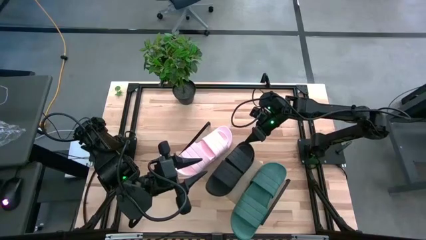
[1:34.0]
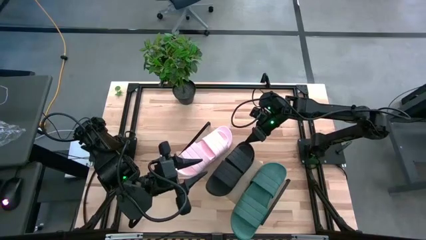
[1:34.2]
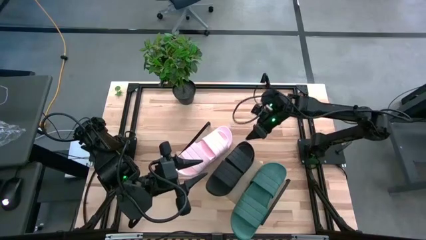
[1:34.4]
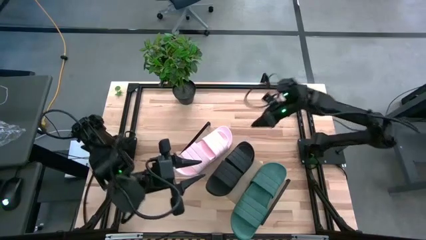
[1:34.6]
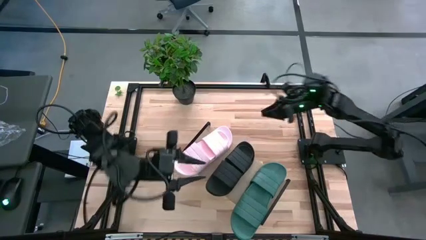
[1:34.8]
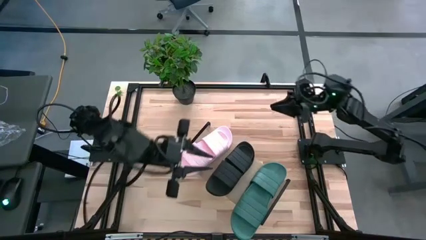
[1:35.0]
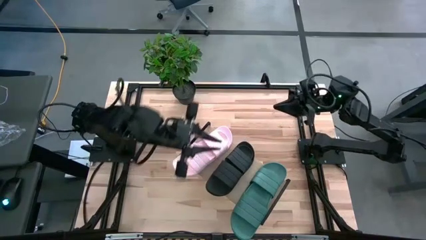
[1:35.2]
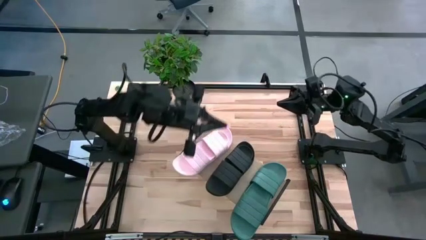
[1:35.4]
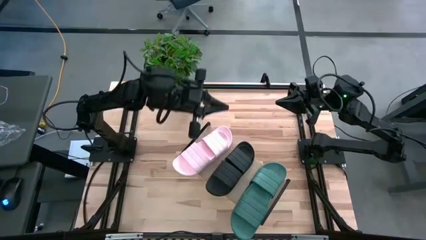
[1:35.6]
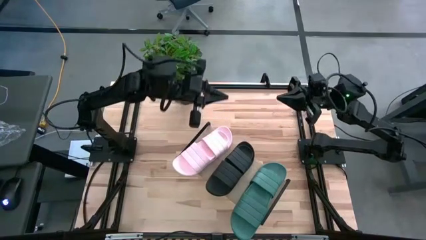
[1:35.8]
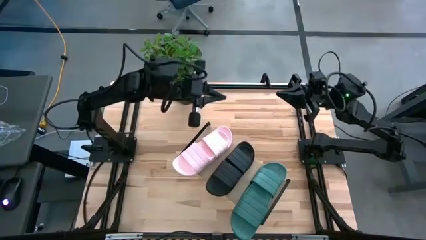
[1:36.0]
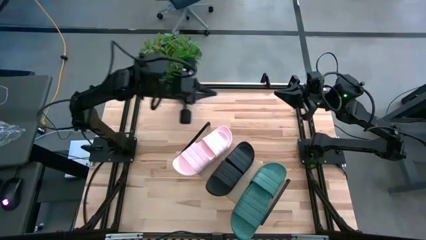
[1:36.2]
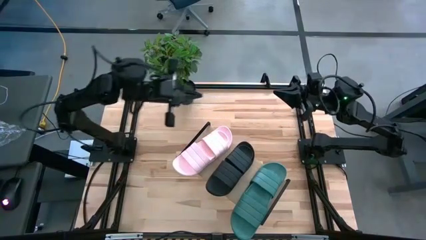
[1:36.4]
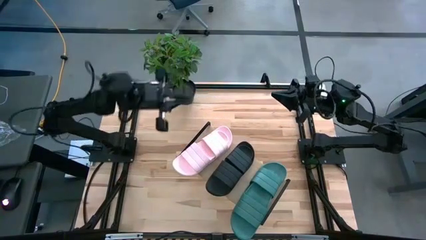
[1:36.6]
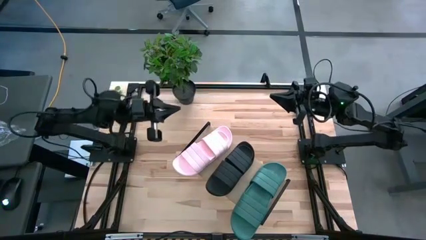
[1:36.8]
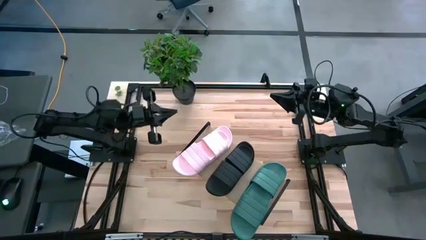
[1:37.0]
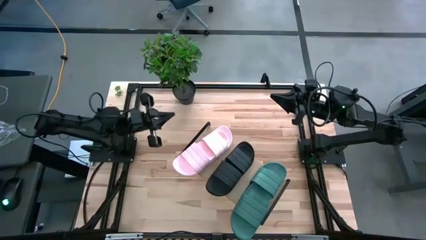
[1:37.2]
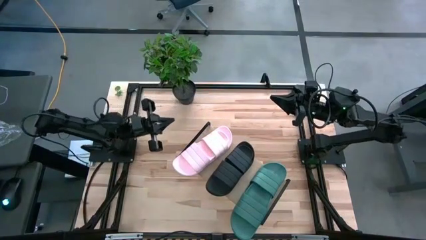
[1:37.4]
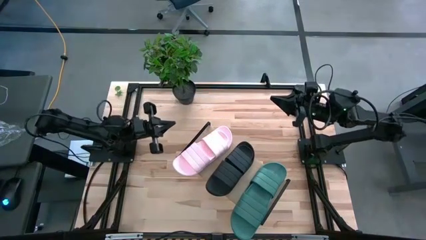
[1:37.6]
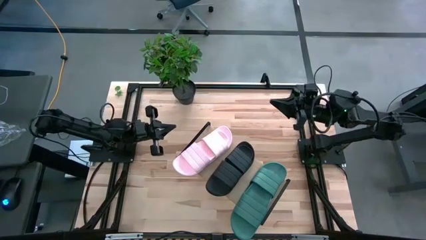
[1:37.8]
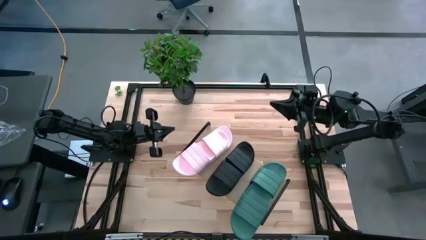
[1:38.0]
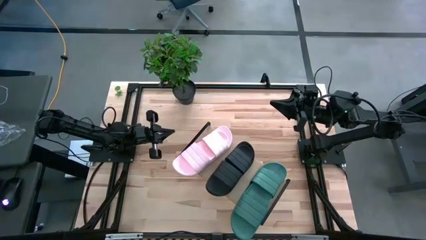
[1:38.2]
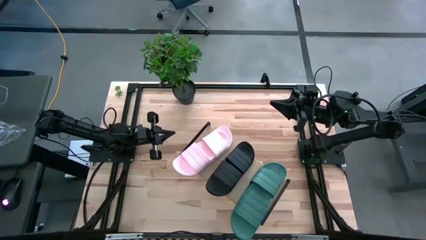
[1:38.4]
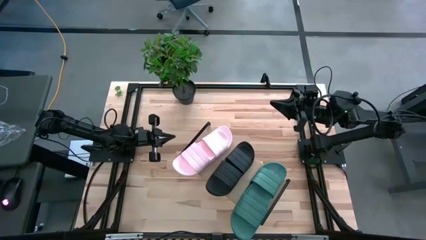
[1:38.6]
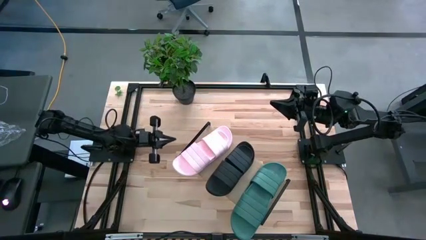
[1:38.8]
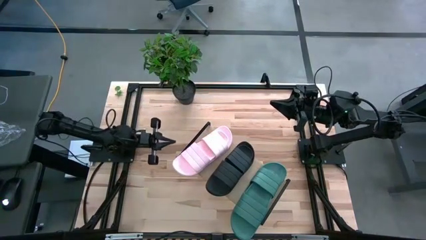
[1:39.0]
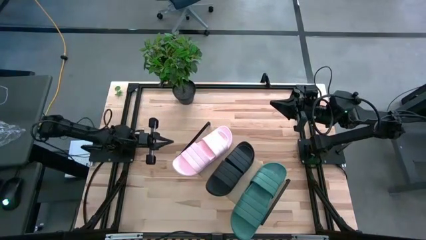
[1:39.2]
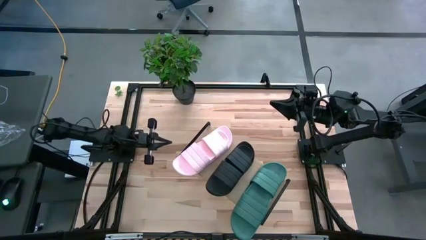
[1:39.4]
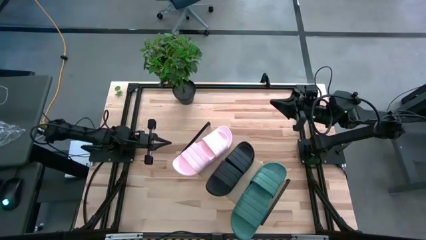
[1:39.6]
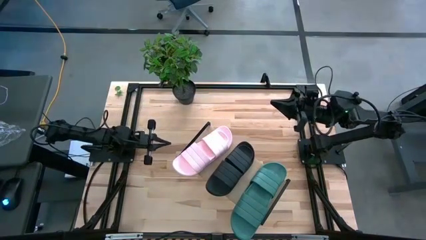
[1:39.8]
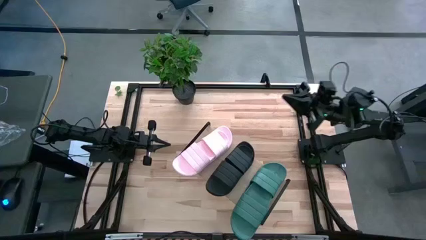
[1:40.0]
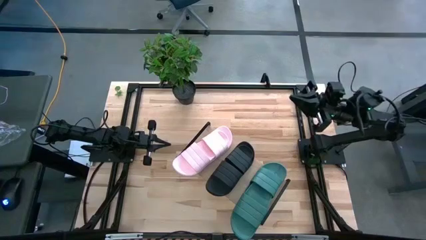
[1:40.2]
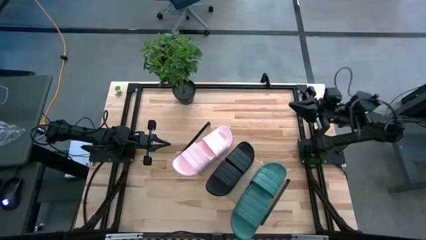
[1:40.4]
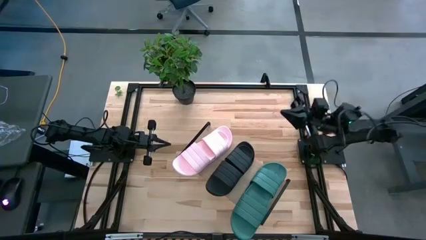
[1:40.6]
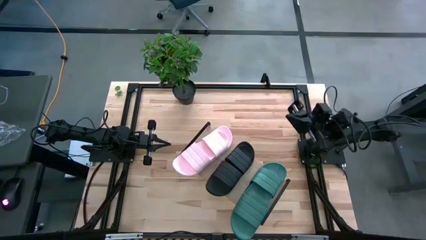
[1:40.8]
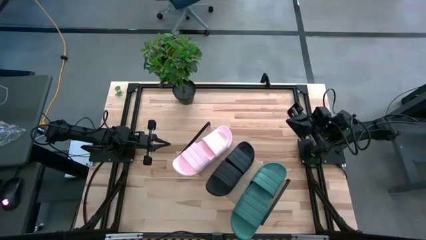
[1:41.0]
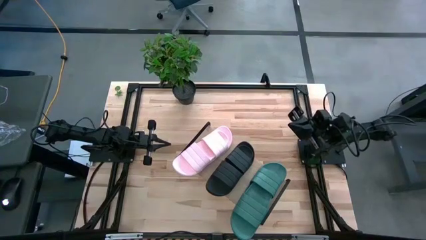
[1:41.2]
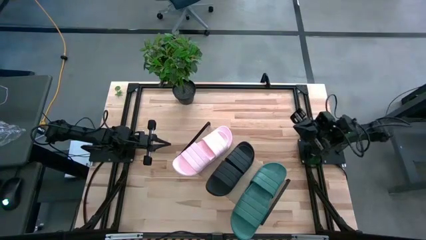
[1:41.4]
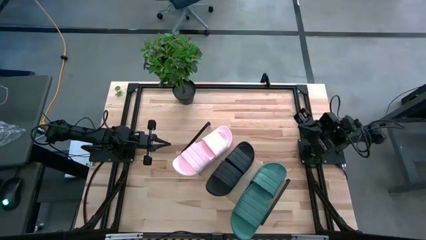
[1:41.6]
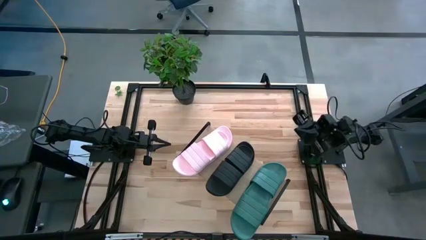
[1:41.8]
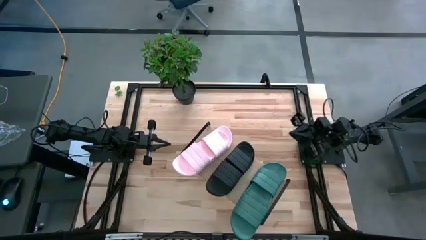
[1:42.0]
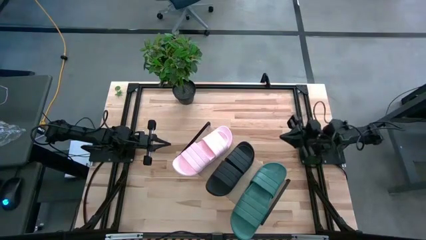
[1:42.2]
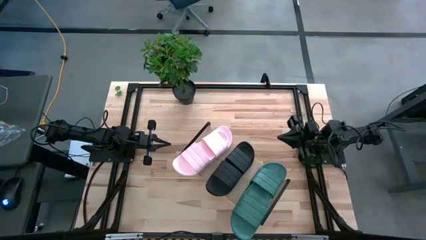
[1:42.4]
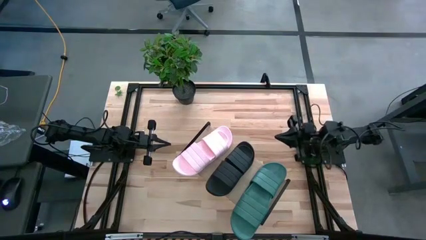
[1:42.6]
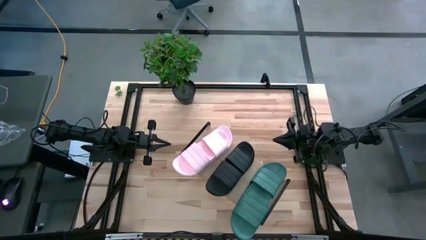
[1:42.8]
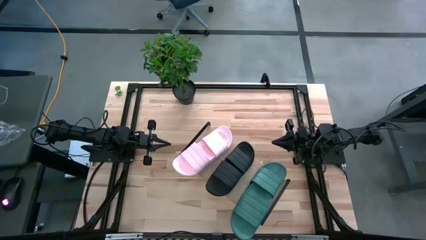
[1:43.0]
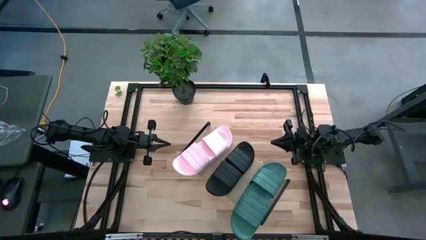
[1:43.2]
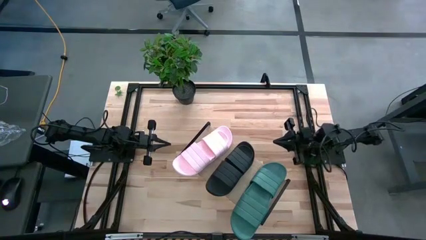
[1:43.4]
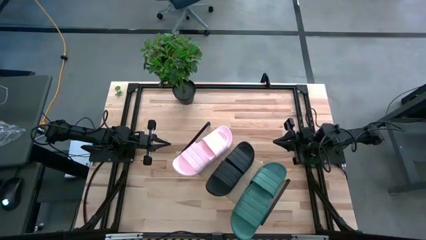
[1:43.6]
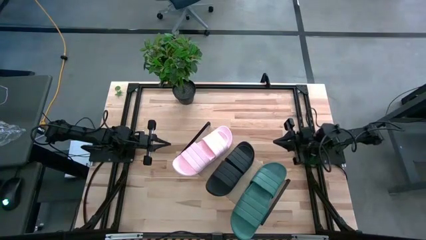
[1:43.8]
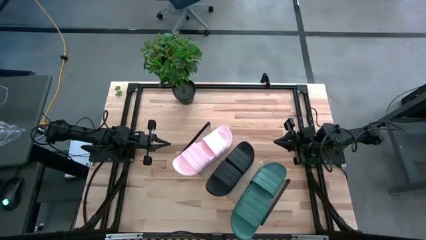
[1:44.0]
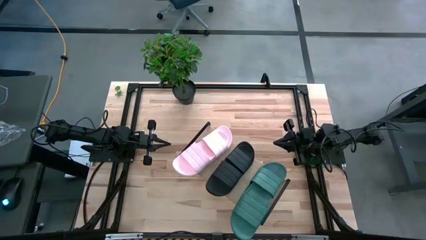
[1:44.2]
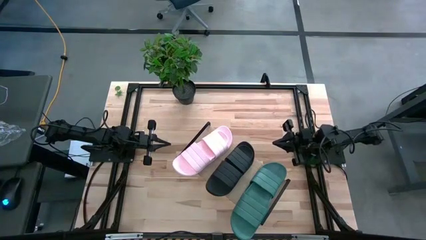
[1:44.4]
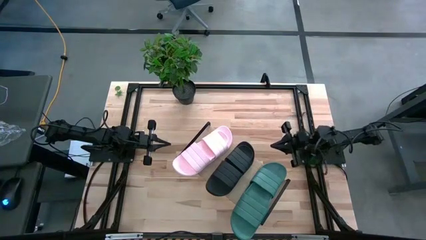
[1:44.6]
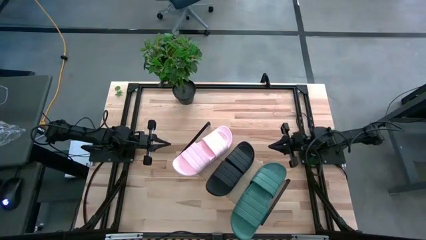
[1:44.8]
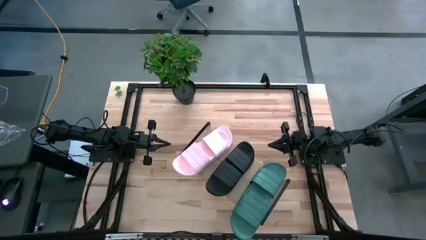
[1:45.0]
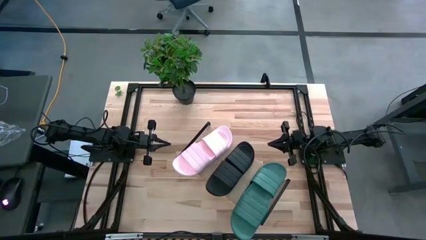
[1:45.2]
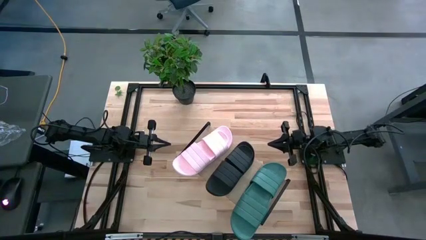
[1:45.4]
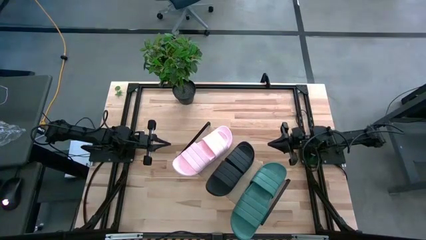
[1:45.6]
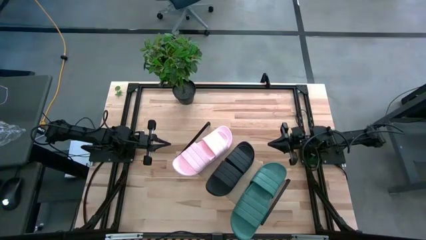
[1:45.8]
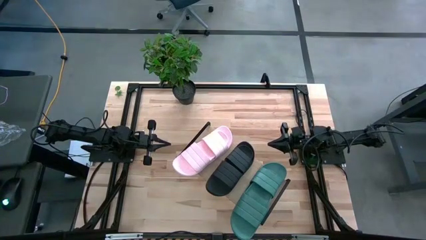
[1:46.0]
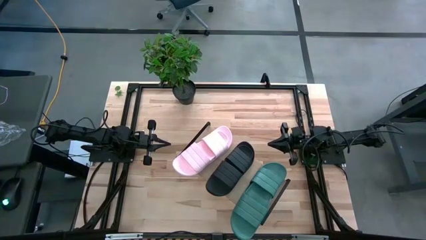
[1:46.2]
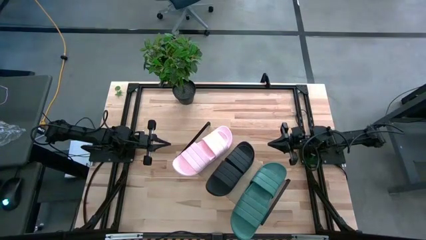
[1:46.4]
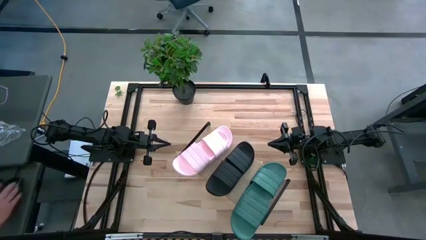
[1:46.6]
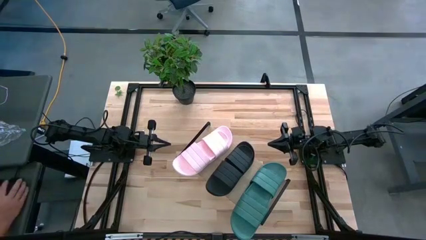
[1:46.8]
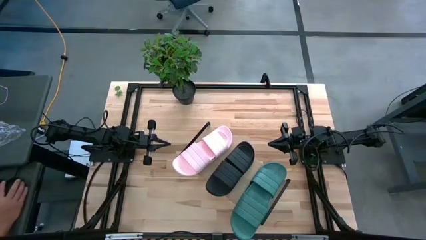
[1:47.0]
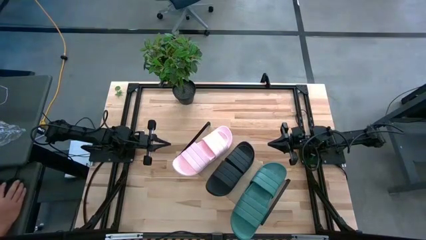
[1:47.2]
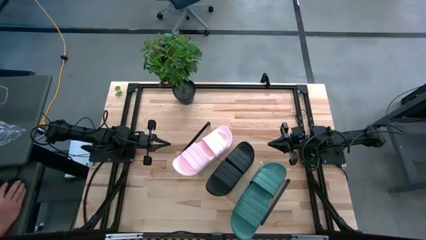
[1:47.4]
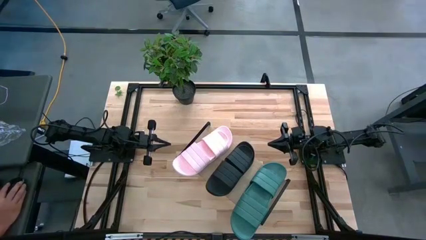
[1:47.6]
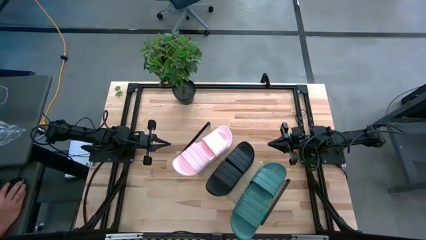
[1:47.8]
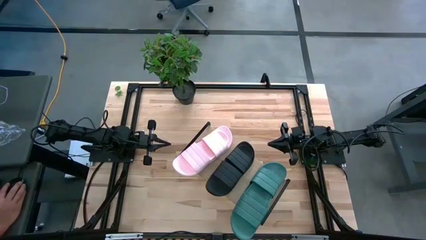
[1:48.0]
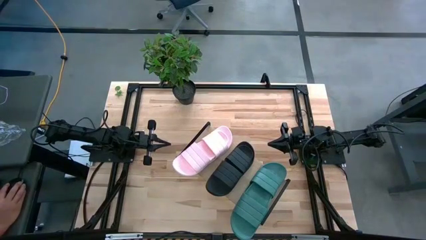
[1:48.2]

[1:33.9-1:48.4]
Task: Pick and place slides into the shelf
Return to Home Position

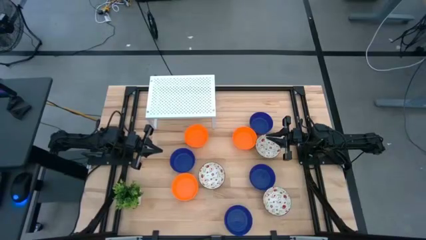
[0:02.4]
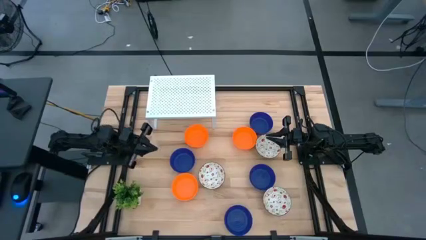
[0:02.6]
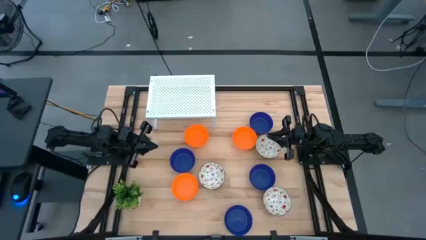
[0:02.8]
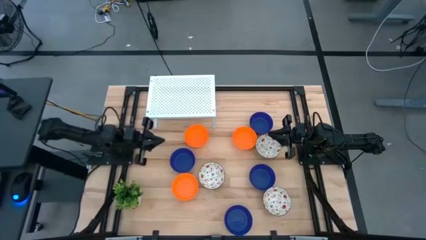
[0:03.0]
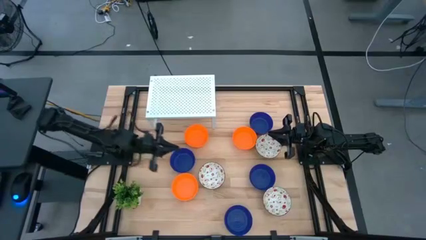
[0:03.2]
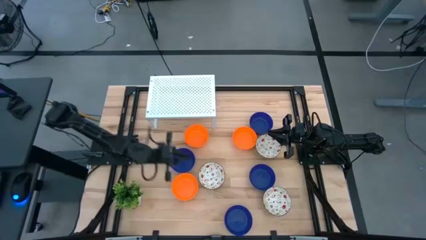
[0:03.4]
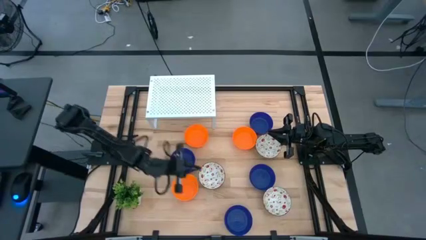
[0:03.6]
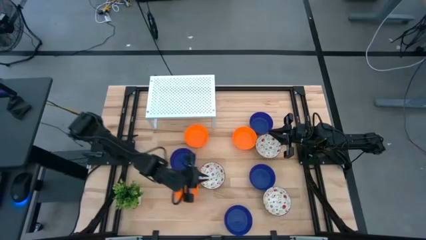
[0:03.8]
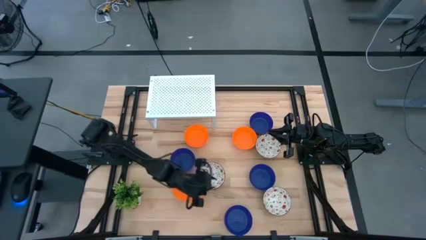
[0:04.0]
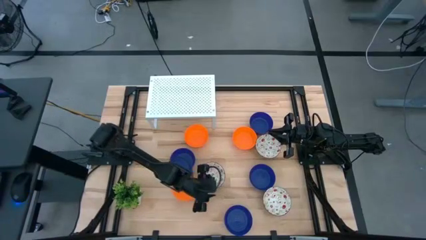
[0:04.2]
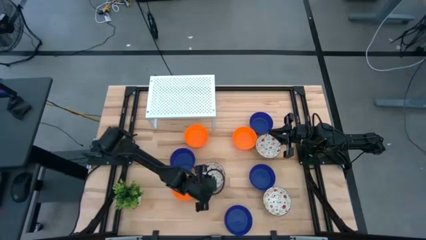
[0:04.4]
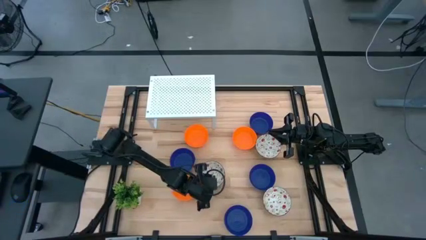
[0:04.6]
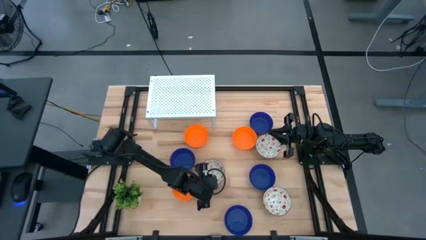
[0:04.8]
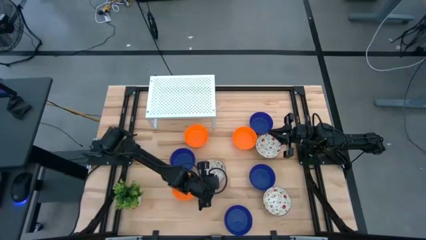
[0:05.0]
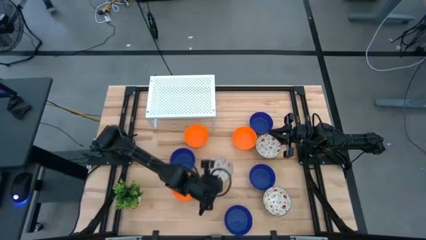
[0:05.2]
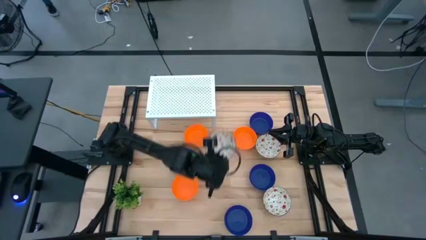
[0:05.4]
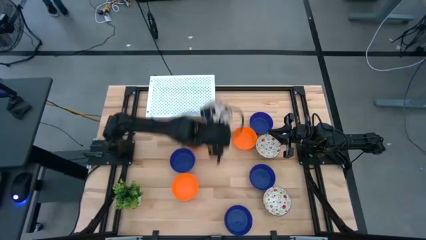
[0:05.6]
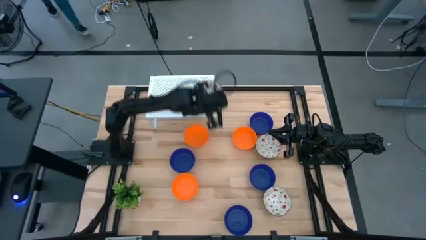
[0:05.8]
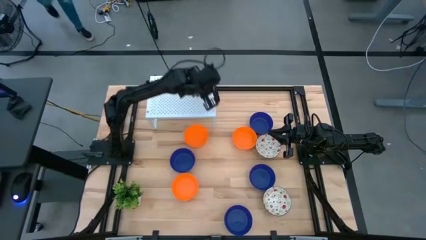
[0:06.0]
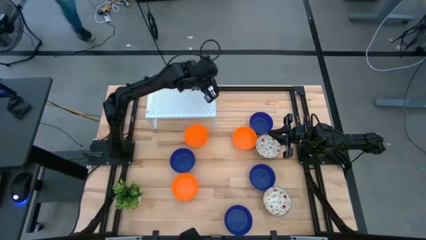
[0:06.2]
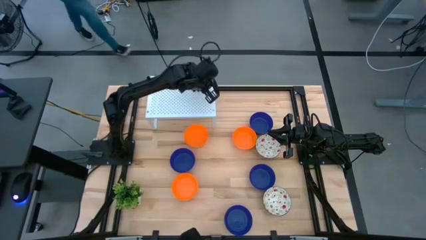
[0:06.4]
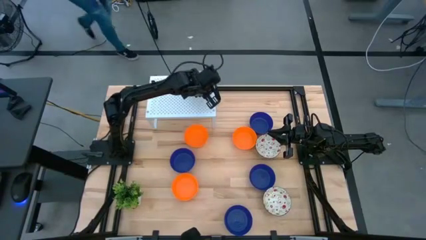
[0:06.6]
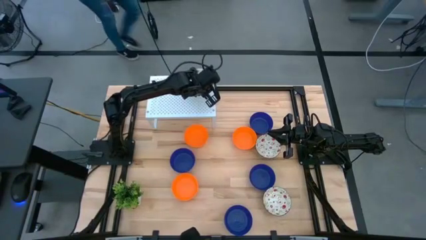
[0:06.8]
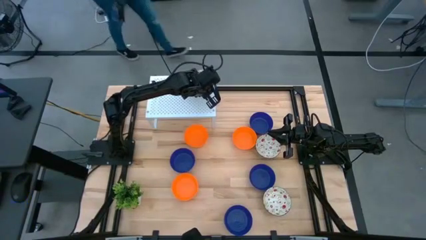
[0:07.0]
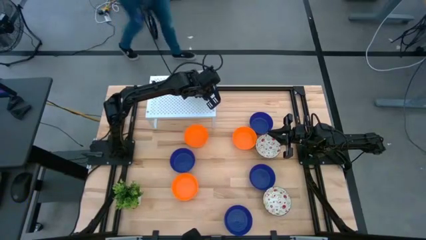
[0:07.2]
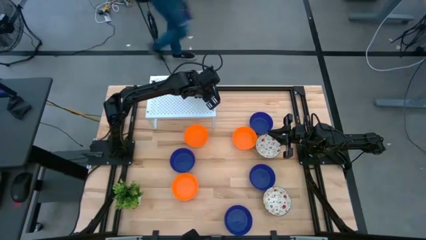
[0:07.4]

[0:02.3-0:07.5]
Task: Pick & Place Mini bowls
Put the white bowl on the shelf
